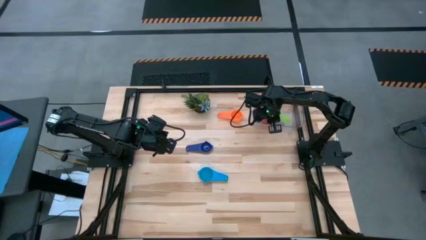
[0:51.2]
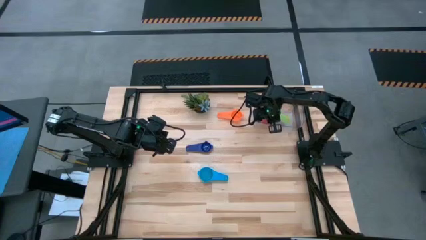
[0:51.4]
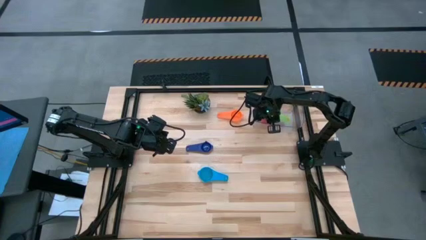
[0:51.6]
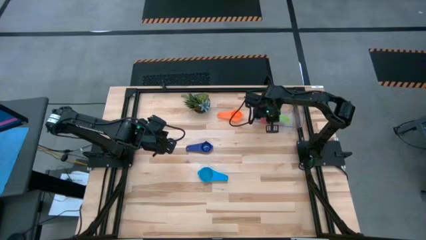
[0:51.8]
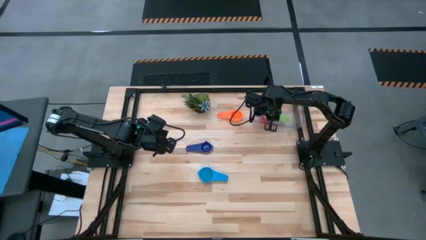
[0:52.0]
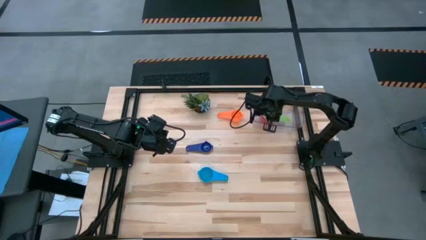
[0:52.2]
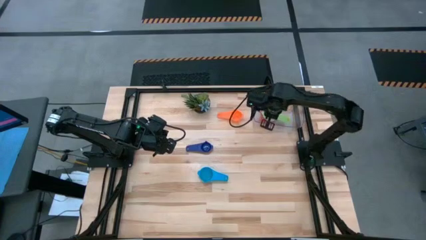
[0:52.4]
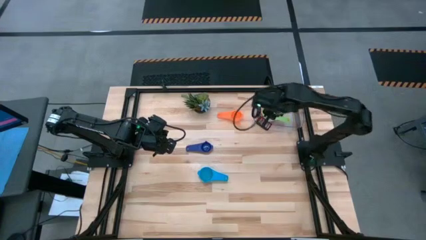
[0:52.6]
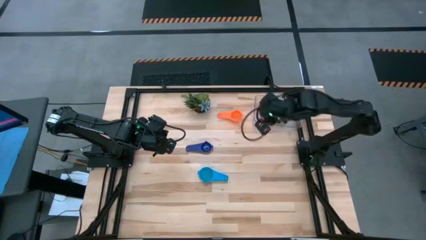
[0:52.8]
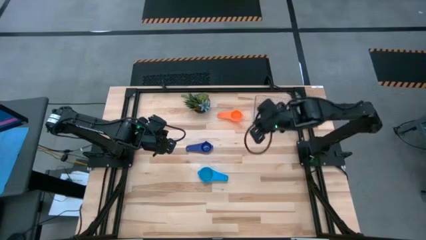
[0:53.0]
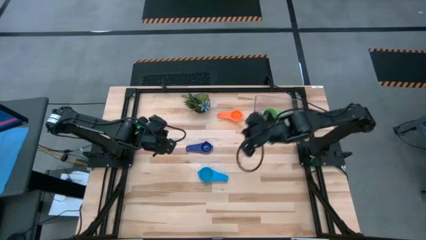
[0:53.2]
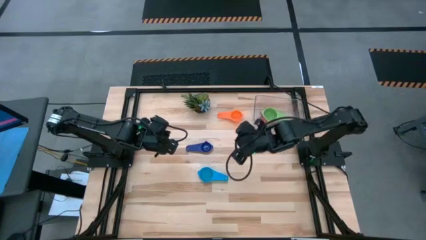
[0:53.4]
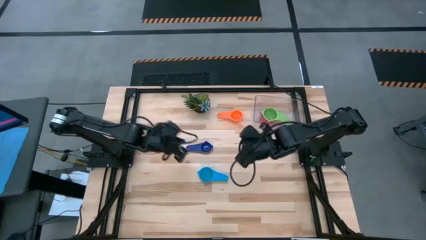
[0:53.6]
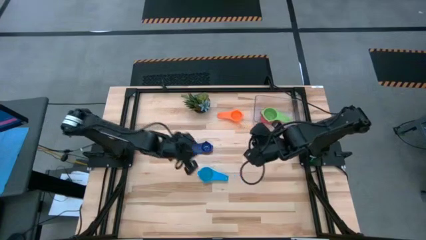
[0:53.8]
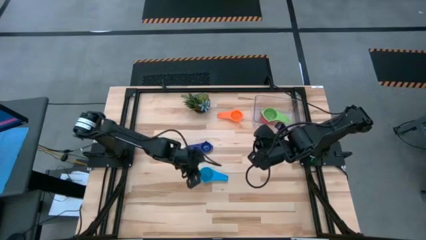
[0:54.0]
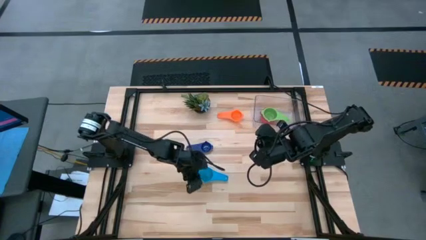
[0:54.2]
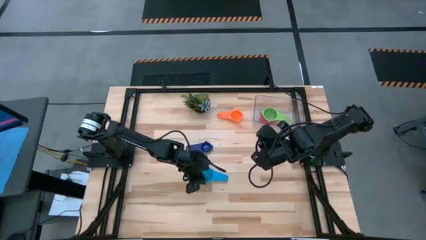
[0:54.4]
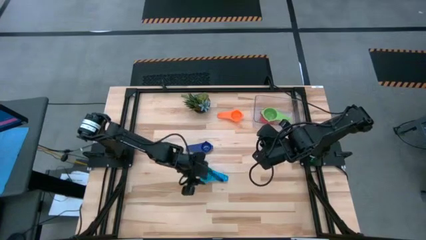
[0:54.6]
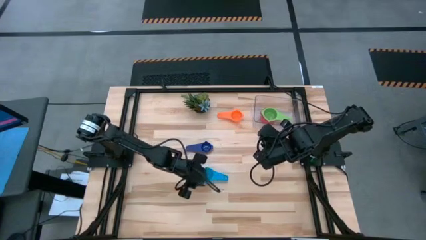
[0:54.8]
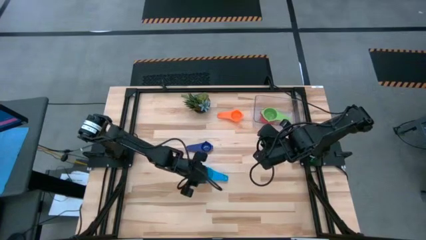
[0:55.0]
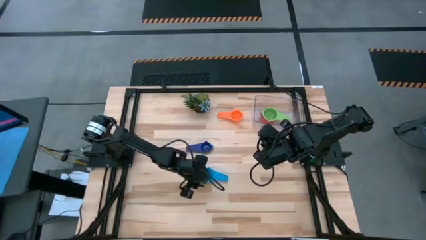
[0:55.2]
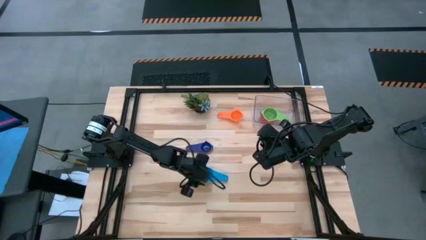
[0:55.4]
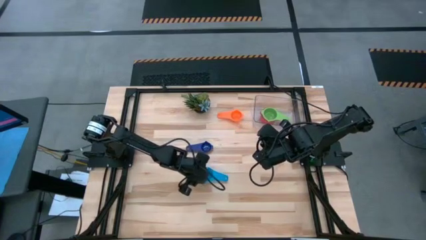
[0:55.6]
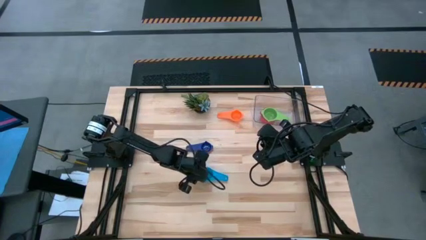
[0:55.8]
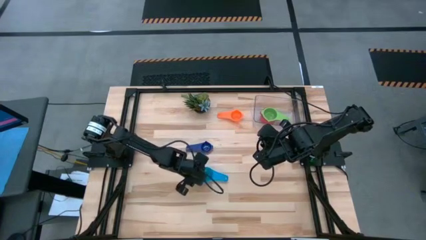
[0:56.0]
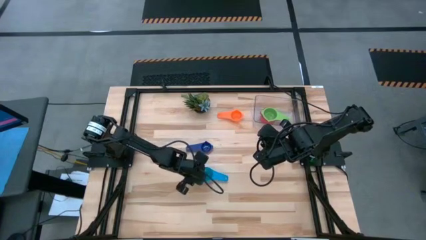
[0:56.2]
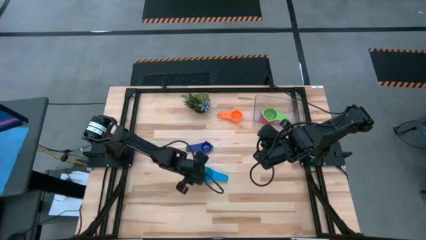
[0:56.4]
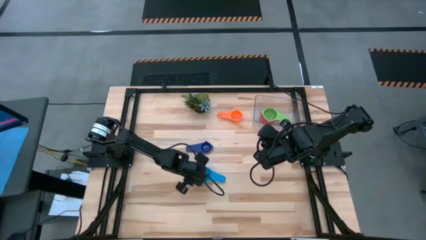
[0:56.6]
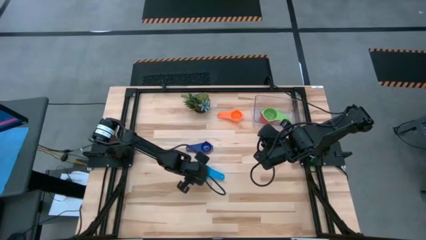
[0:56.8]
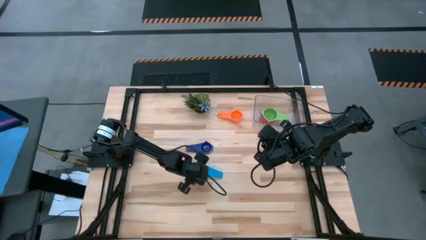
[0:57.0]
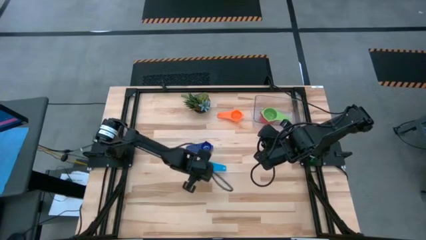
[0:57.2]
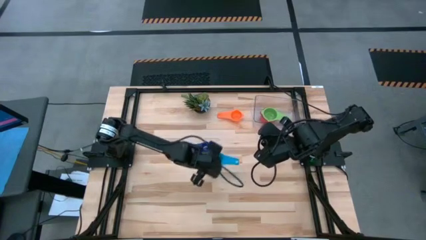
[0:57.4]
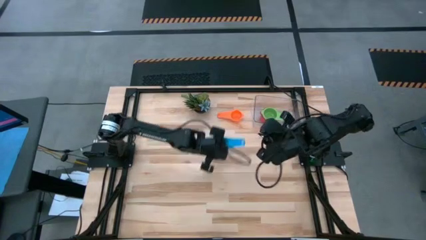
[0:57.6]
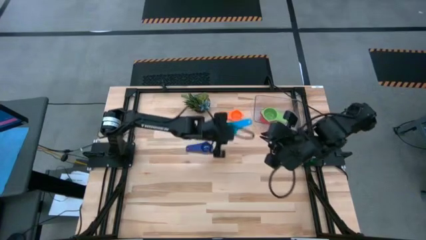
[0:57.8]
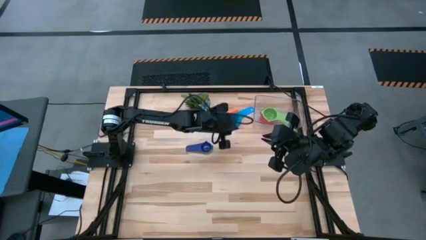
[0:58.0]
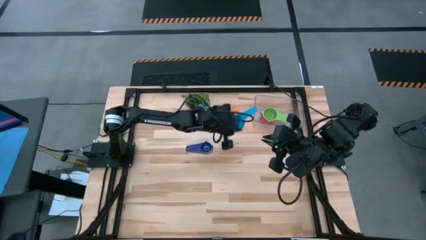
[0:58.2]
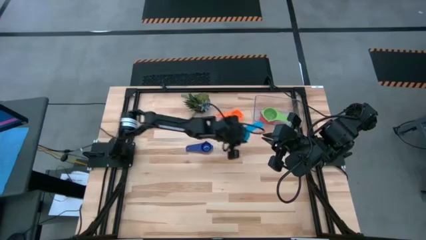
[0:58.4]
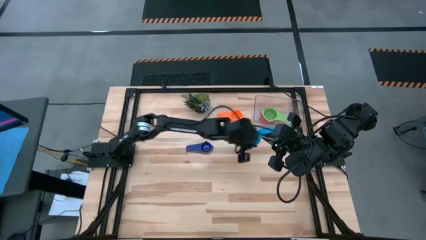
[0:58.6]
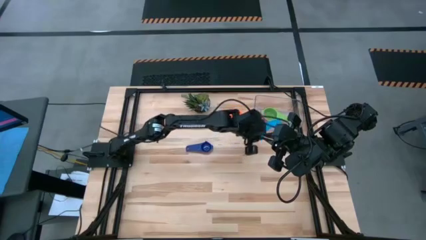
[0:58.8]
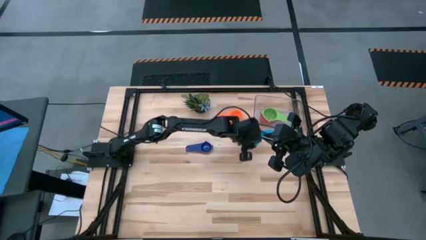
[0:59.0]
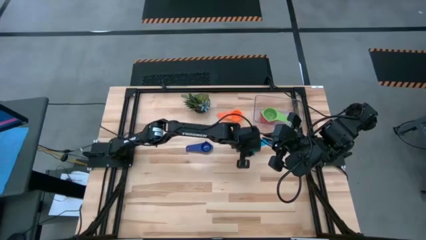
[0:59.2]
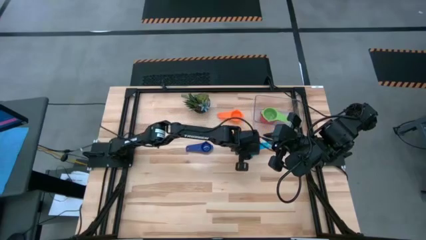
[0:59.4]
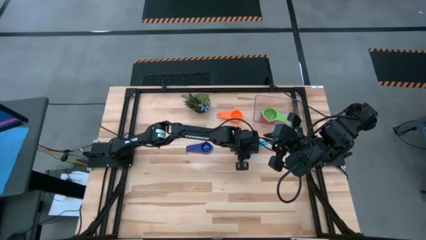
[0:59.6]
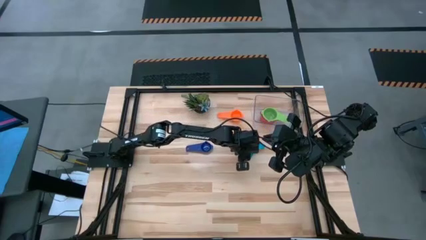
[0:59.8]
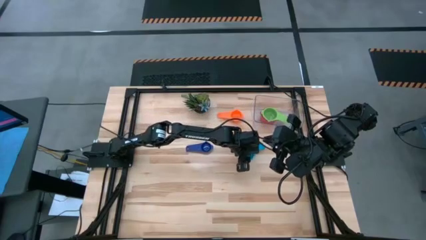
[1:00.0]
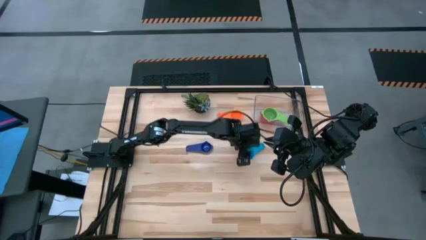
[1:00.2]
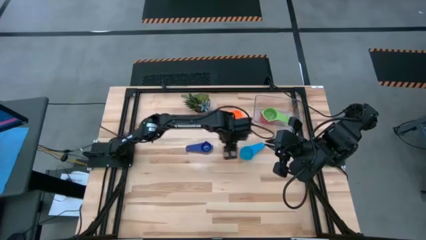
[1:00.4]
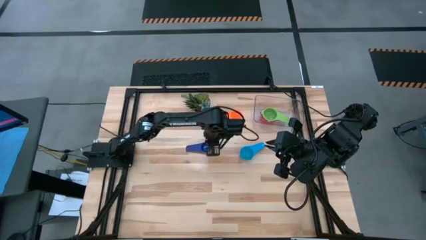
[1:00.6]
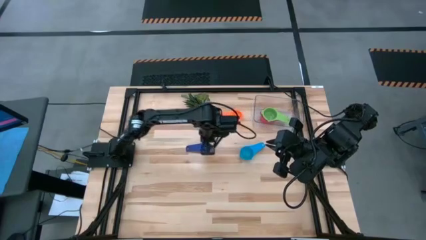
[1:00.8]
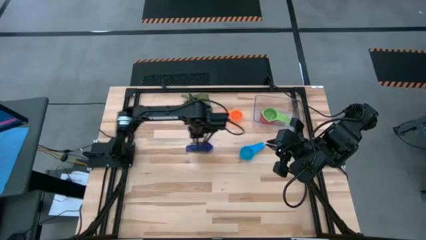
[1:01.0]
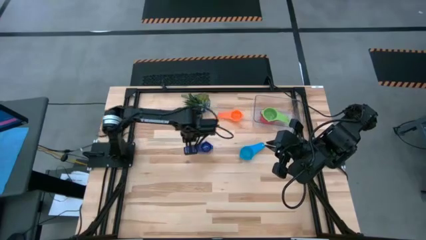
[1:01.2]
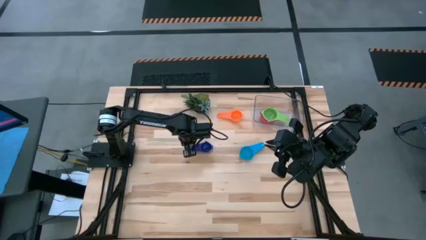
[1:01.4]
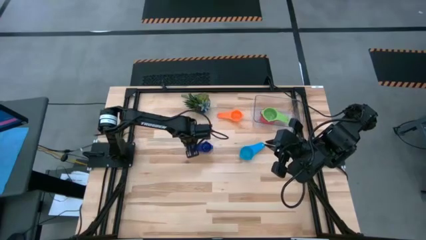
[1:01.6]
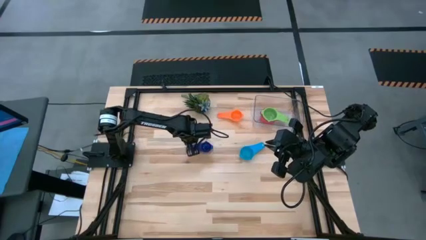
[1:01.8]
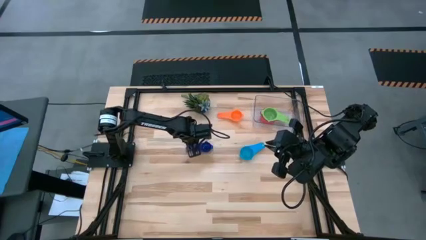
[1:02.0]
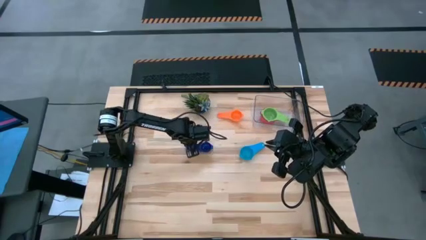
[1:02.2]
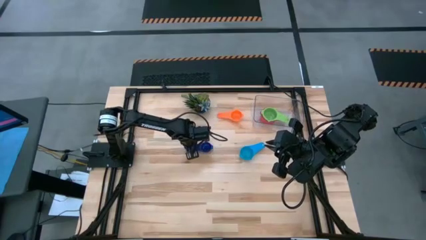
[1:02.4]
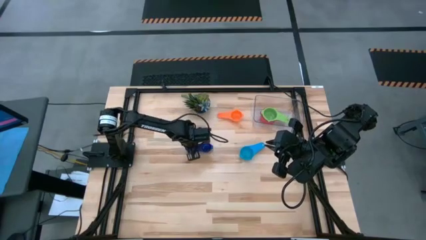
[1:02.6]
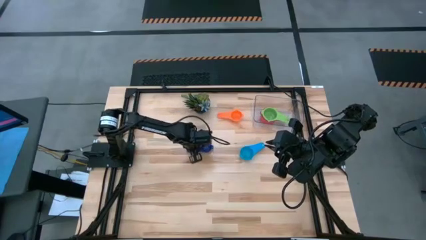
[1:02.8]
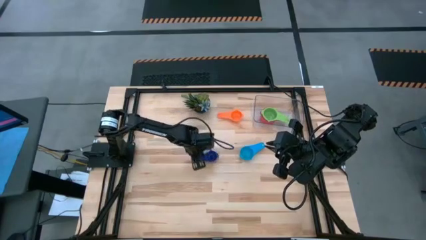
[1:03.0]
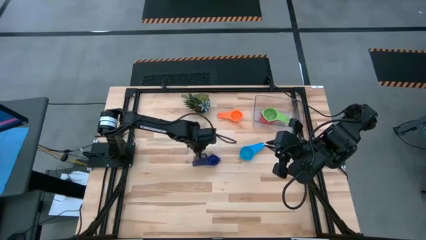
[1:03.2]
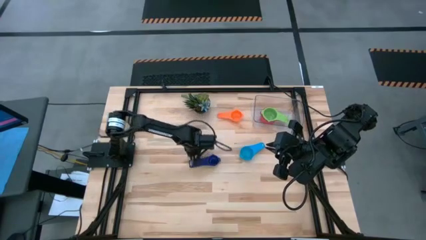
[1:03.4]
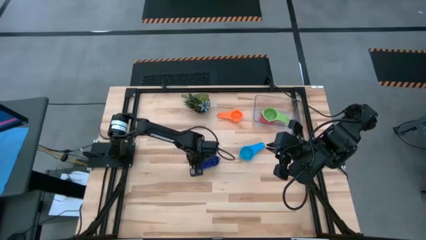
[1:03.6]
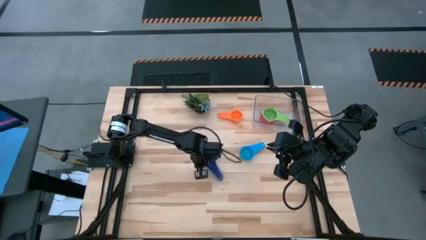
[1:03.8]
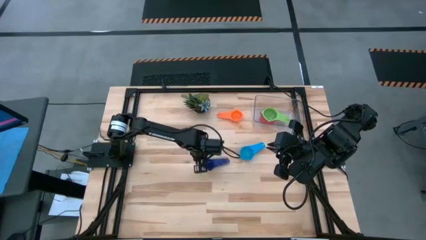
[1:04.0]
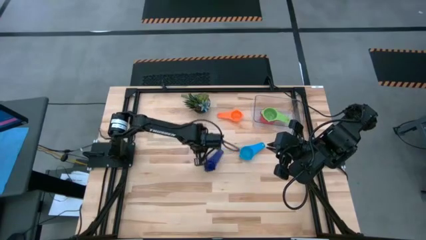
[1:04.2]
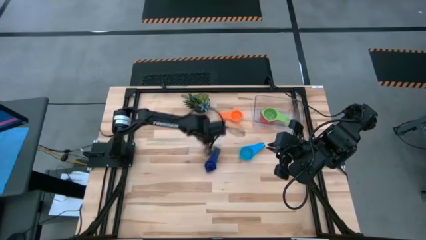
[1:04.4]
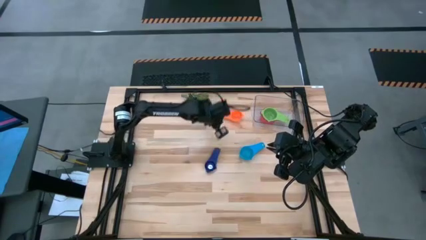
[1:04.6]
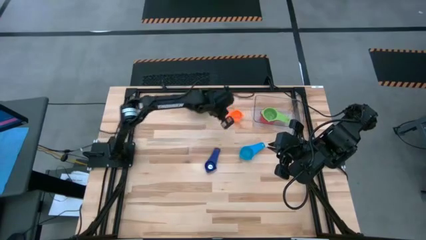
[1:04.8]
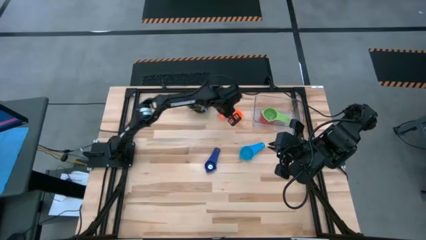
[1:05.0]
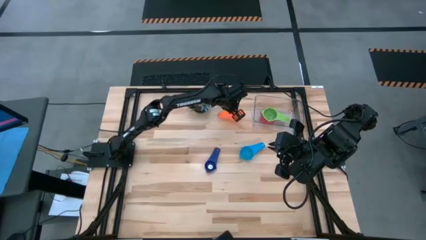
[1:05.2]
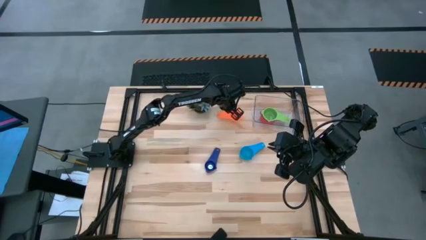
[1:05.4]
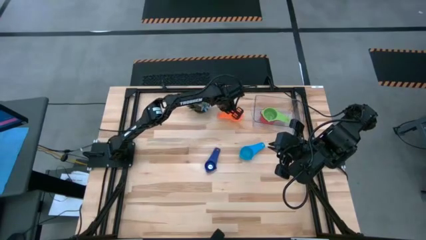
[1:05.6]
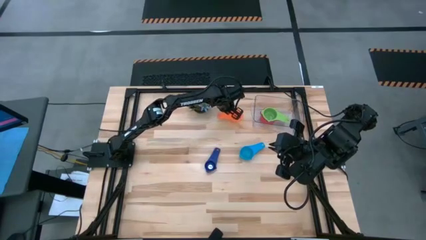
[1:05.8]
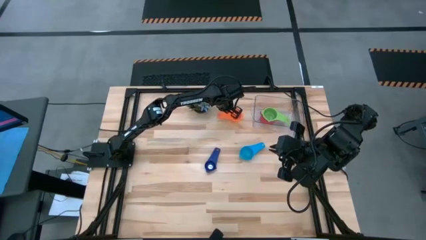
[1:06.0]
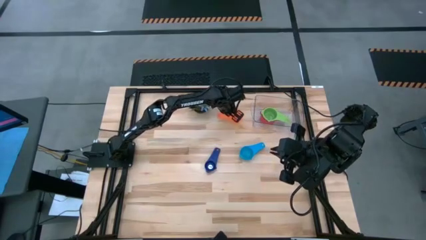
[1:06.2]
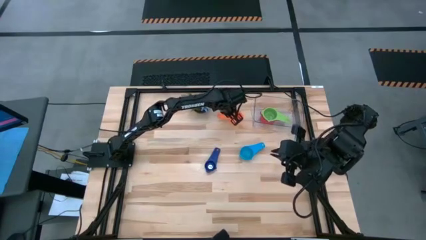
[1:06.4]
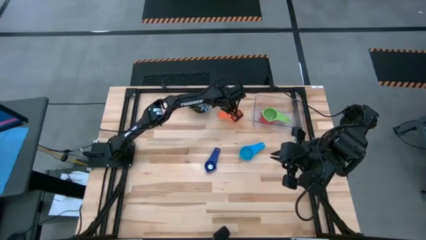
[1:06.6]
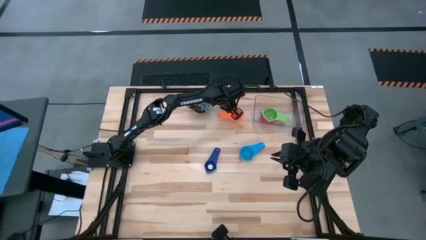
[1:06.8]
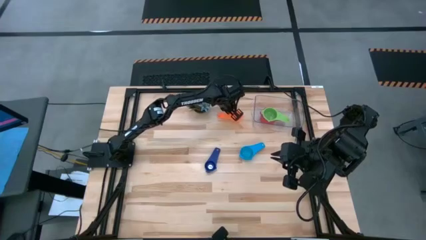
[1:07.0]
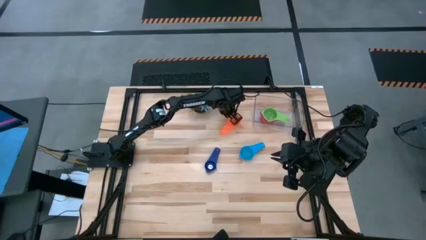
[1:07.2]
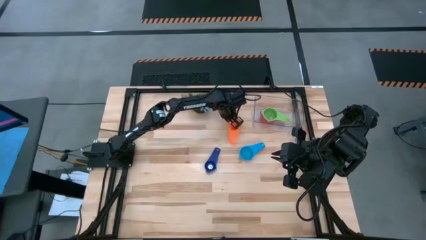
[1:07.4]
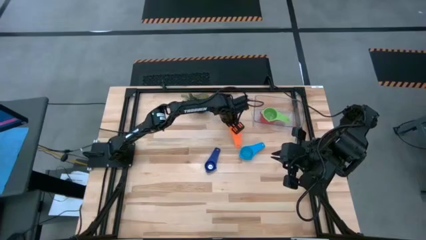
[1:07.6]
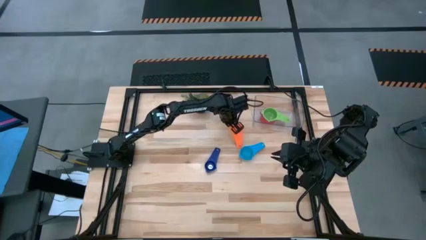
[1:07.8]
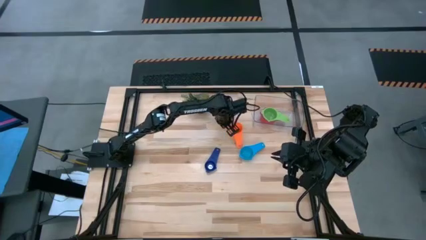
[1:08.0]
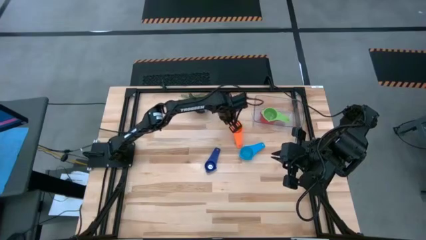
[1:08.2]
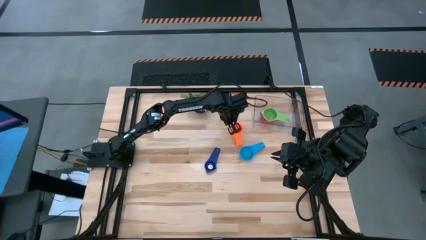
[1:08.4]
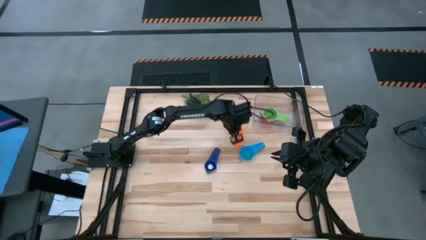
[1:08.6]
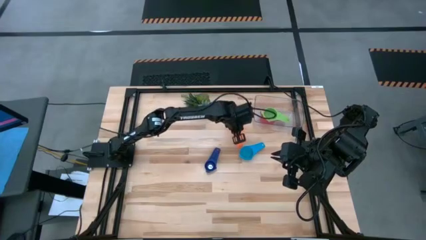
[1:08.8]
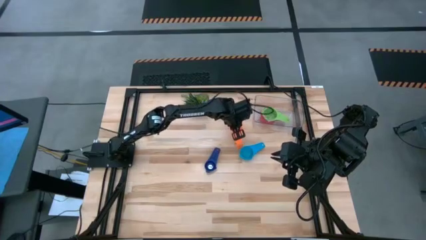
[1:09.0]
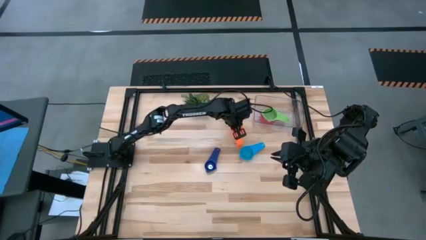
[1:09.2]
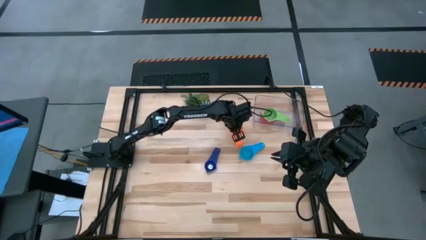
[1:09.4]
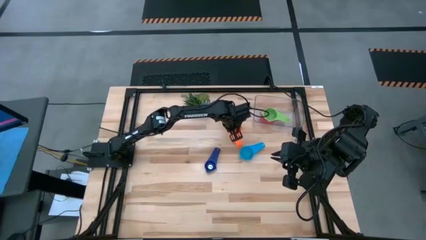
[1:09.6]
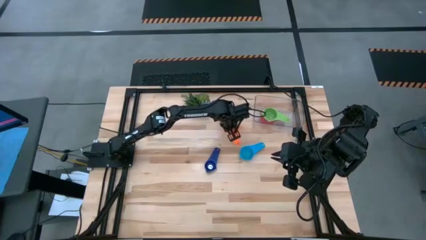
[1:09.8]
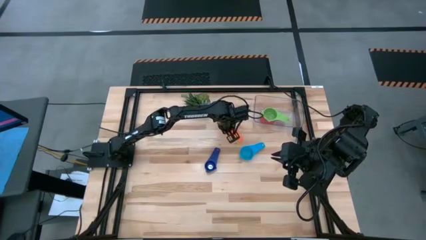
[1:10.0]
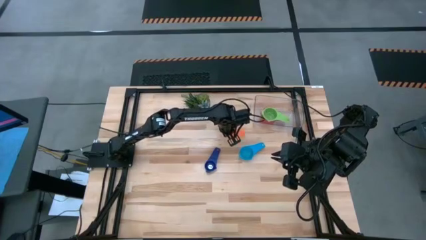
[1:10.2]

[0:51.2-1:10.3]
Task: Nest measuring cups in basket
Prepare the measuring cups
